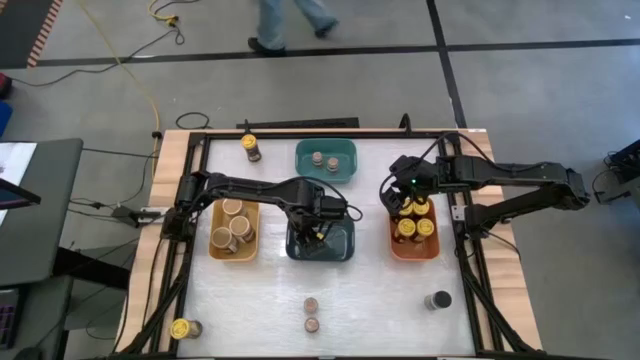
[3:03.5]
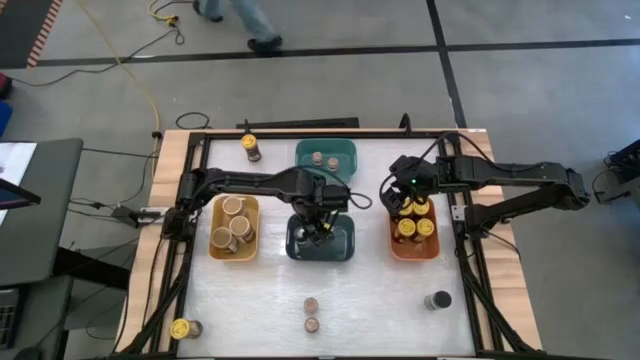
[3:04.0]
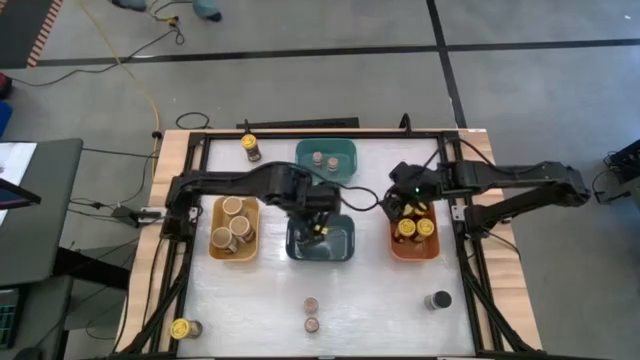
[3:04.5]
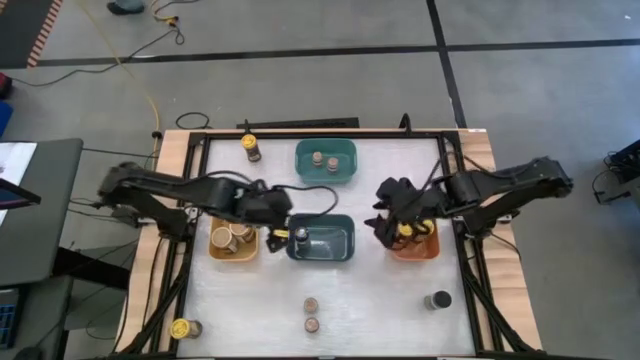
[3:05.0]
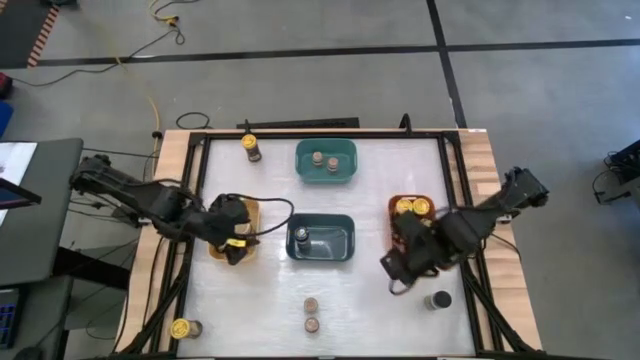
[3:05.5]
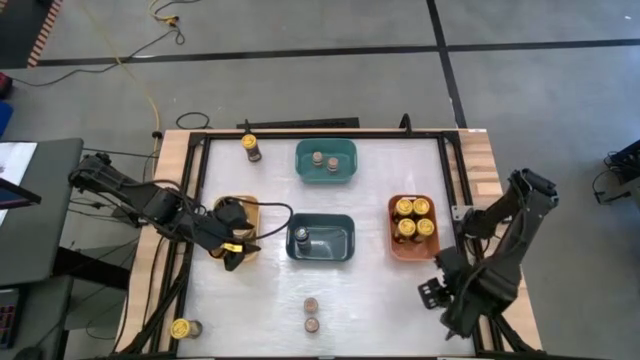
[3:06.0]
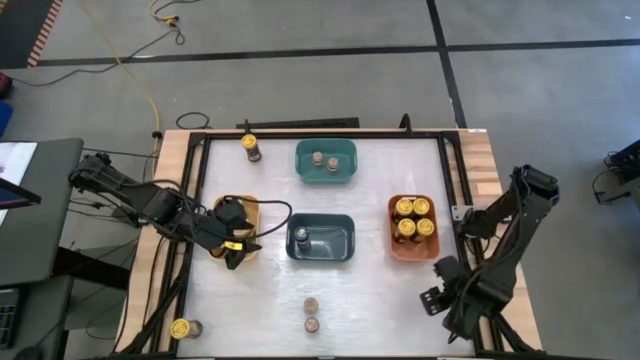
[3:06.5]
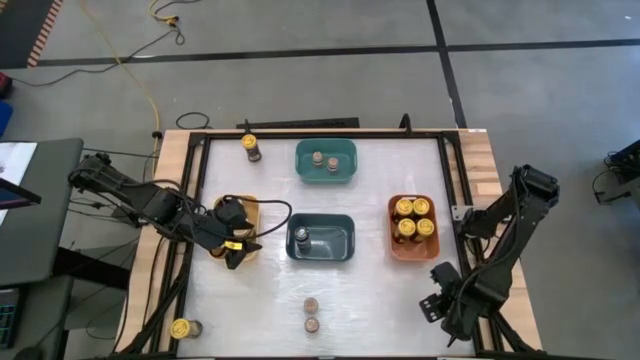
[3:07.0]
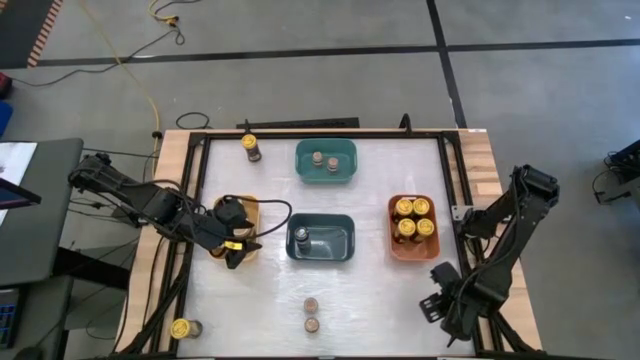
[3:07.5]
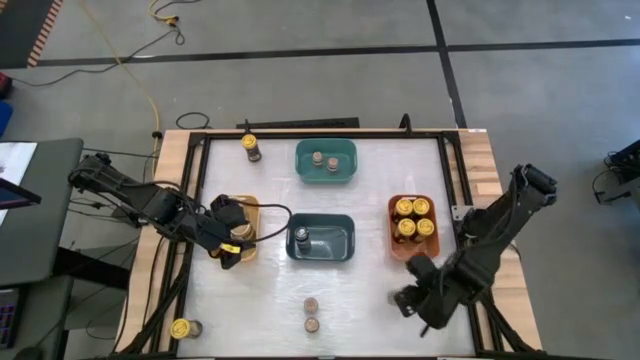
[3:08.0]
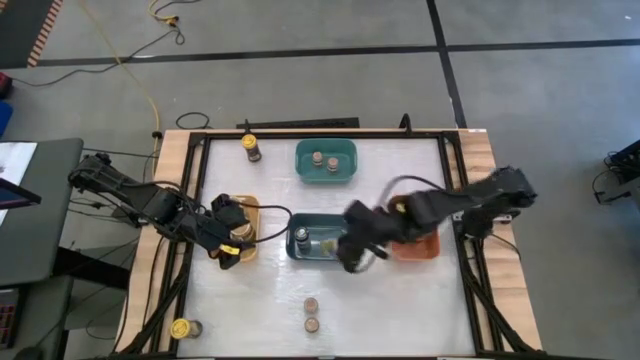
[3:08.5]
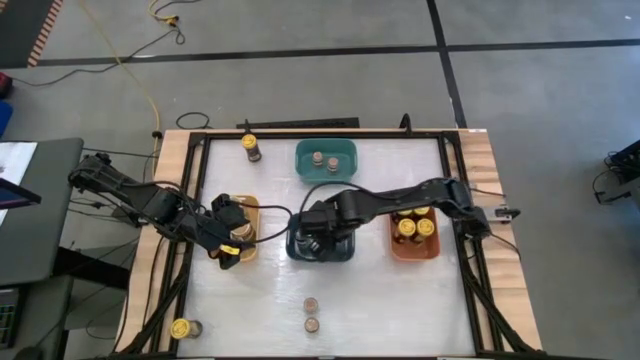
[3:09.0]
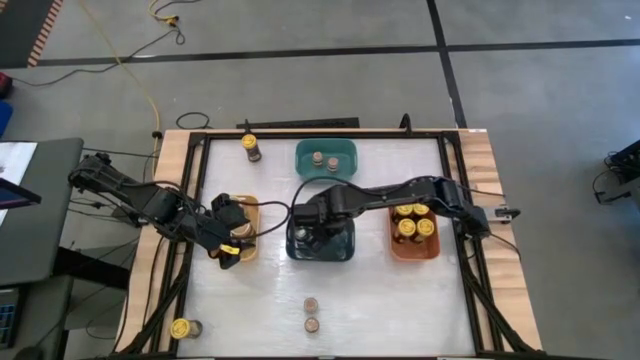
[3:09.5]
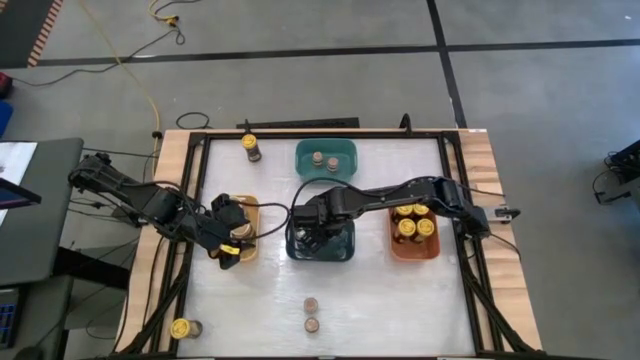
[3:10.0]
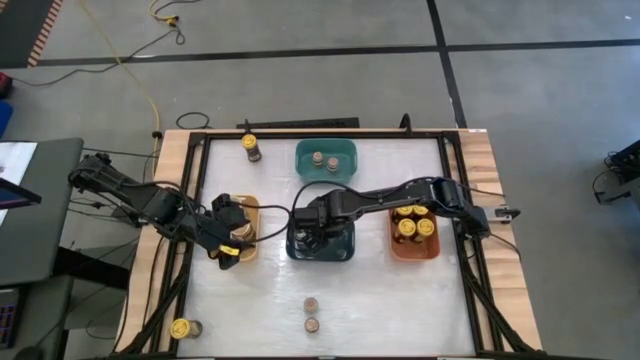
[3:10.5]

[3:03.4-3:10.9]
Task: Sort spices by type
Put the black seasoning bottle into the blue bin

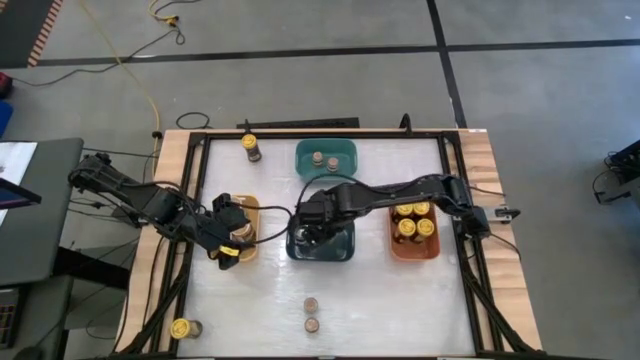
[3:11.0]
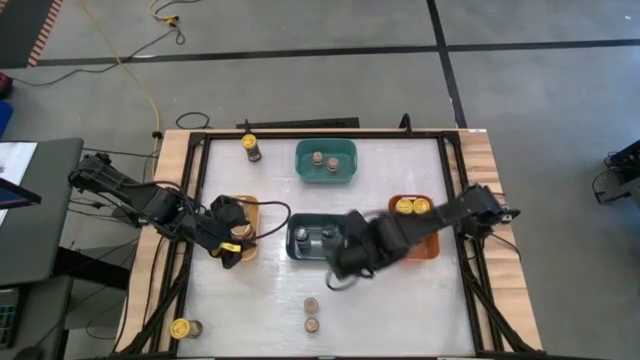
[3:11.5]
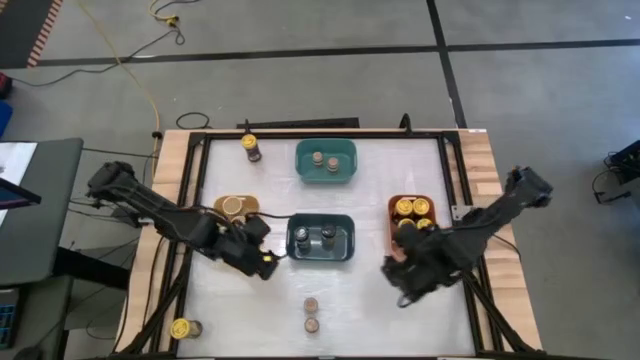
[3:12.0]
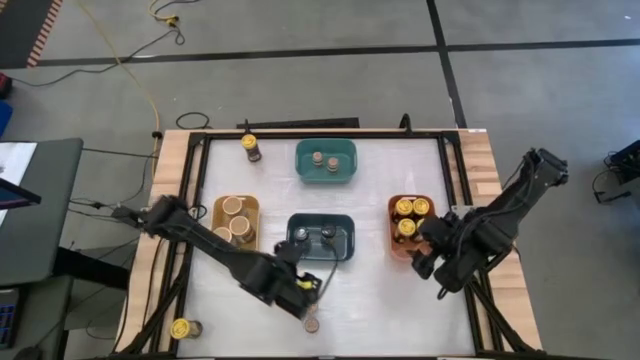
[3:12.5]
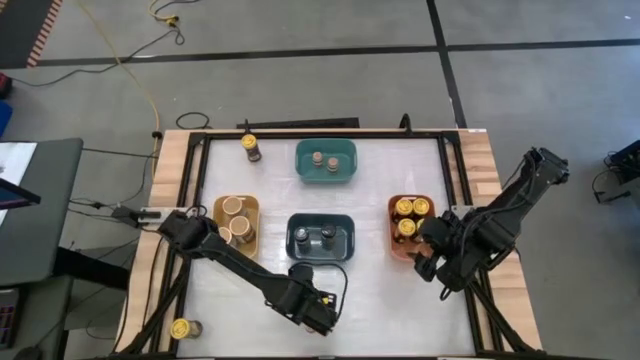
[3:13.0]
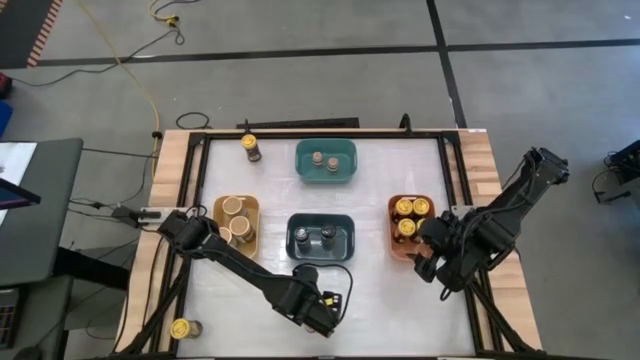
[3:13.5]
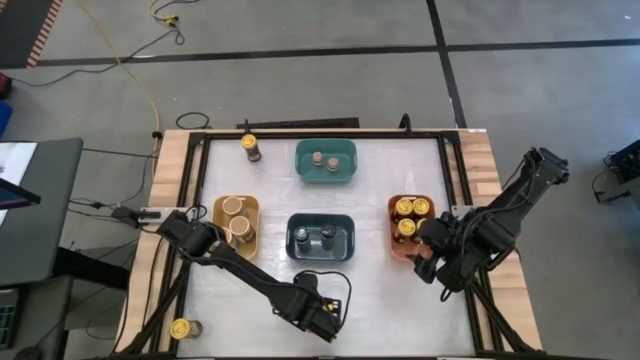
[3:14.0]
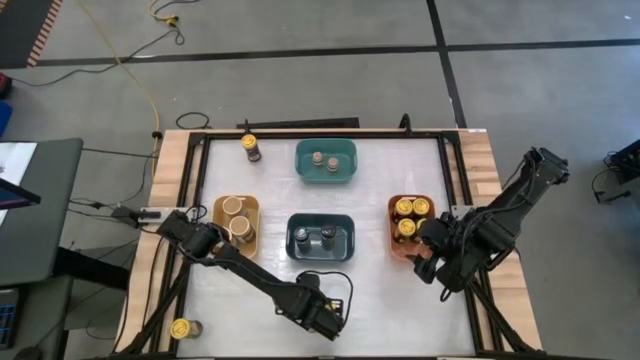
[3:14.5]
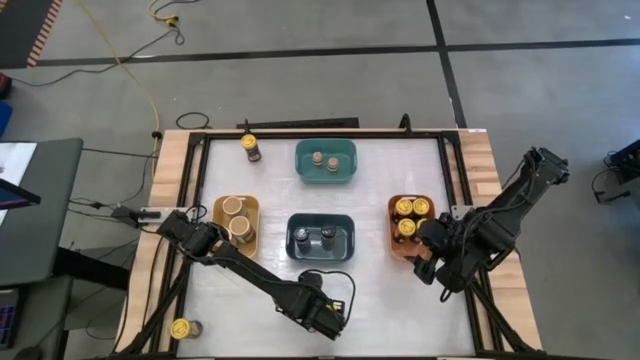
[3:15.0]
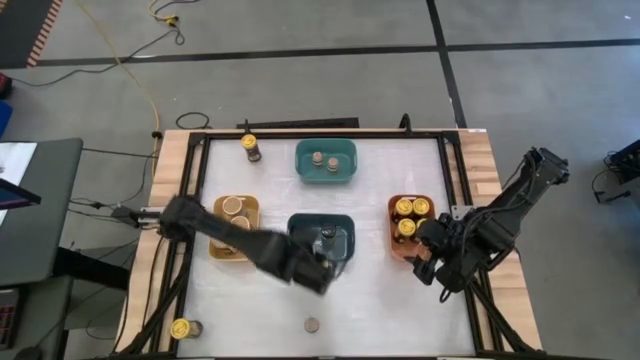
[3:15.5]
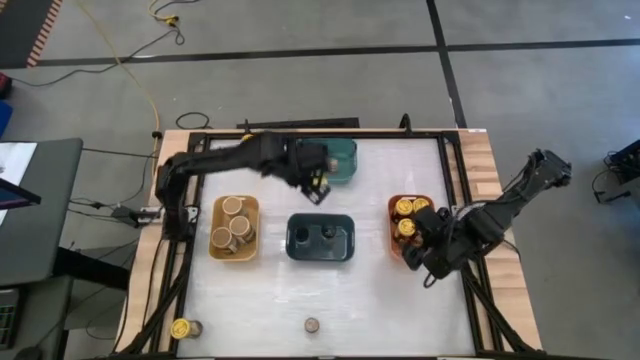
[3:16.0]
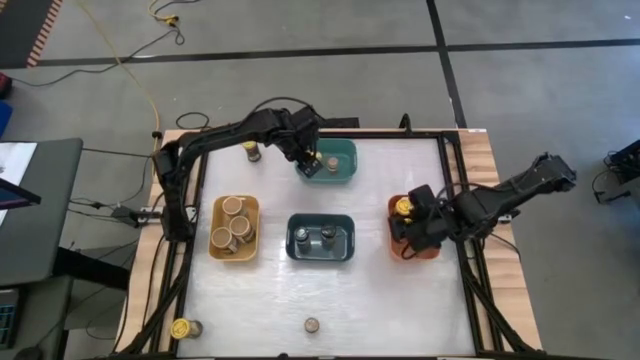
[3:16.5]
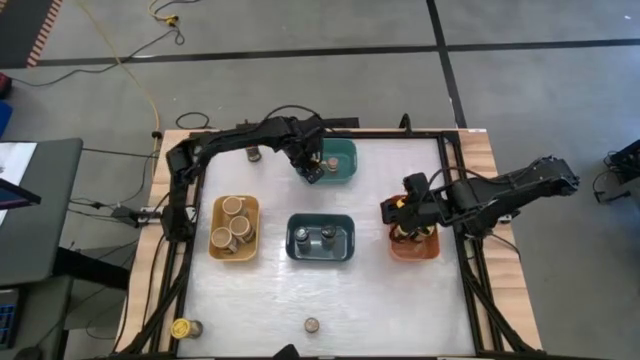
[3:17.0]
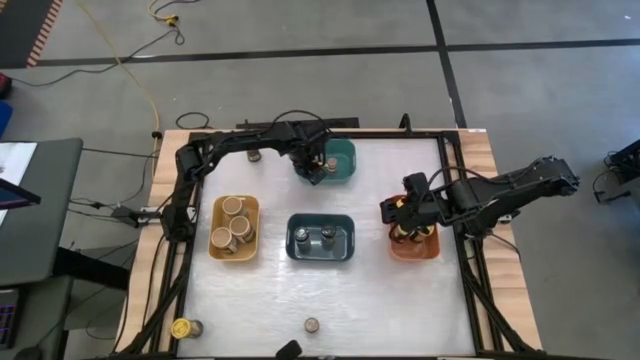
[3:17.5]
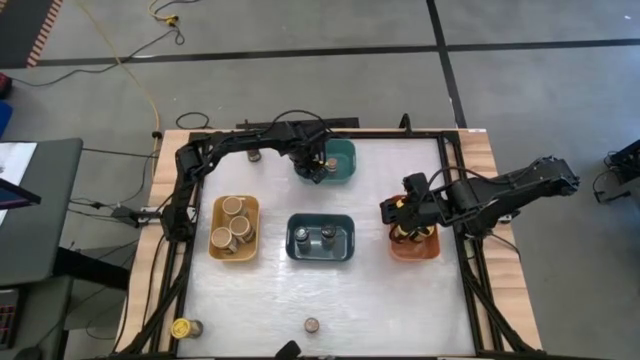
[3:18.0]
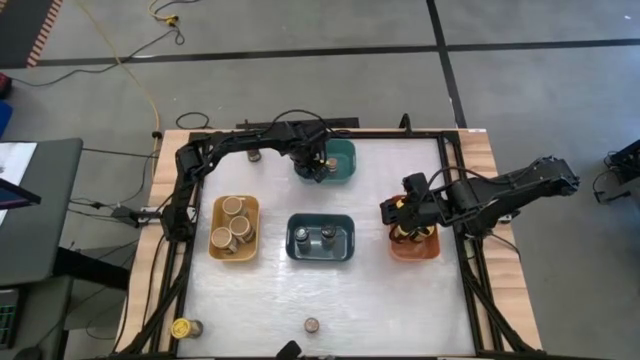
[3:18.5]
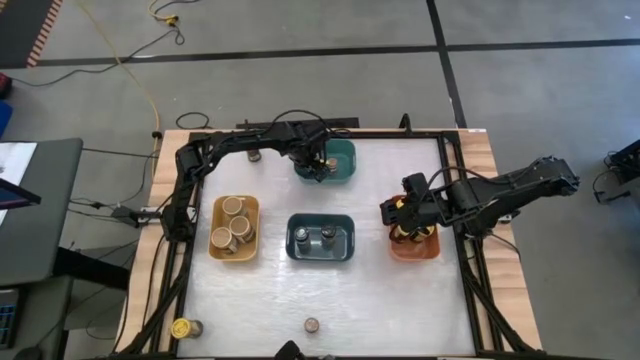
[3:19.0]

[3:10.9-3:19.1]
Put the brown seasoning bottle into the green bin

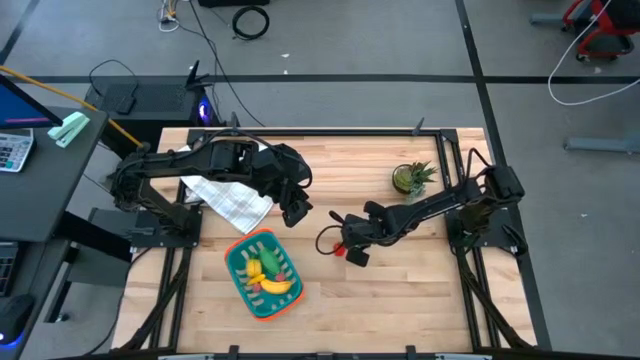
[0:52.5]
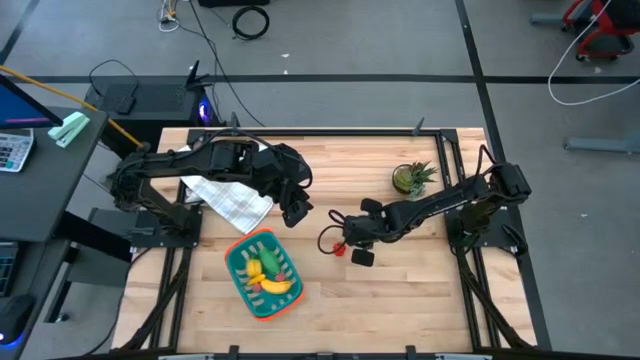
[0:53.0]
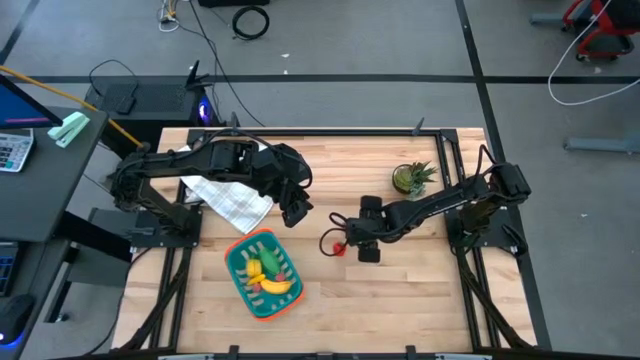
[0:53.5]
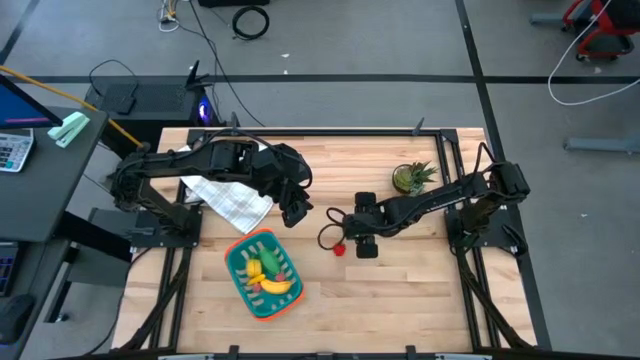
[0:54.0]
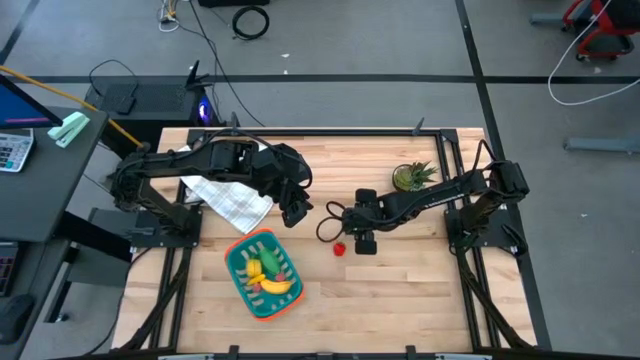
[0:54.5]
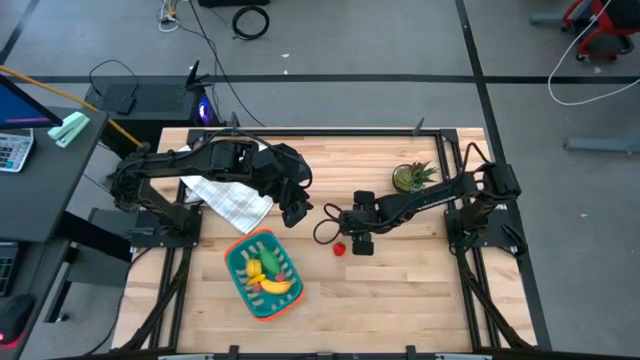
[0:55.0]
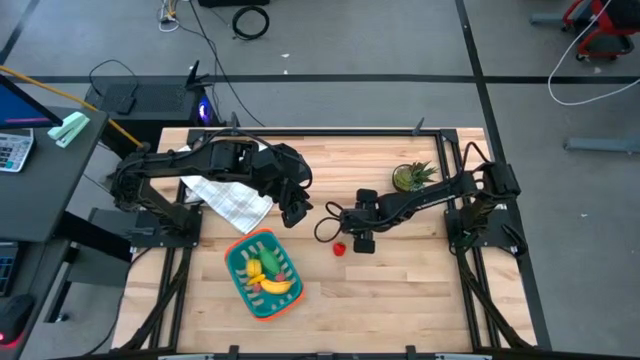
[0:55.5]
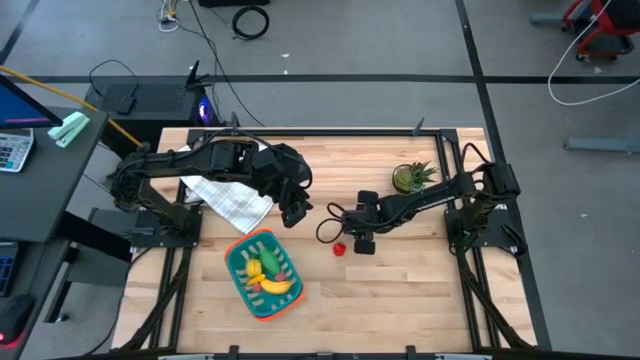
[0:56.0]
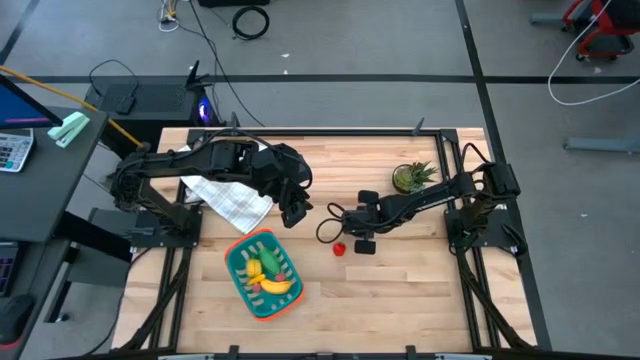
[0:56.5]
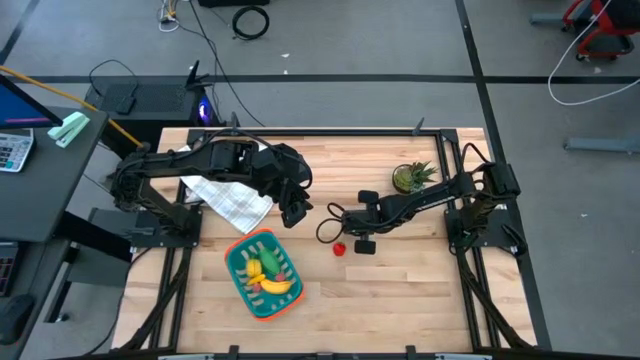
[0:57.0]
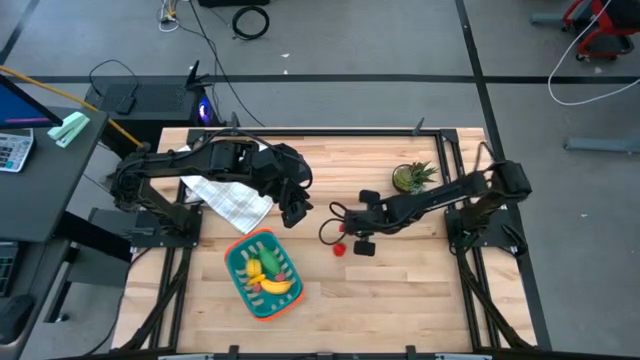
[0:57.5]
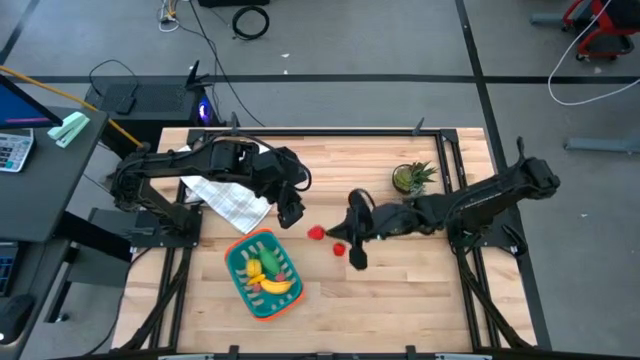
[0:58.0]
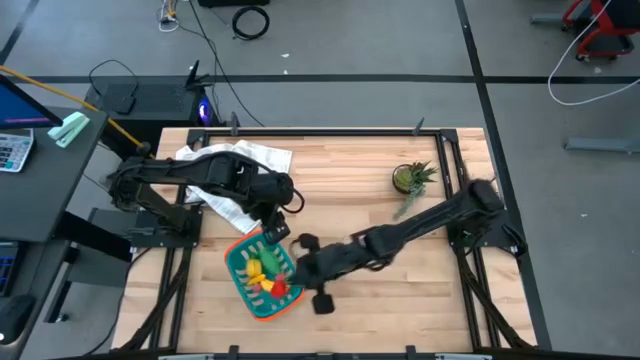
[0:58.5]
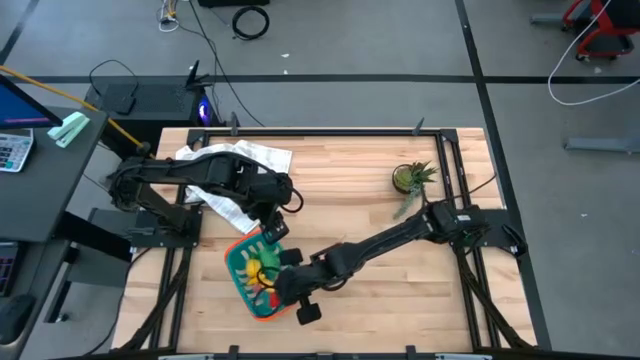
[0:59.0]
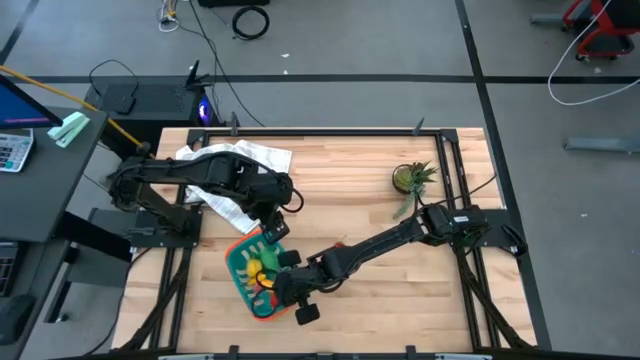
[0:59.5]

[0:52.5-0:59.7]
Task: Pick and placing Produce into tupperware
Put the top red strawberry into the blue basket
